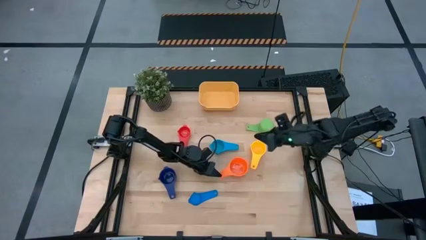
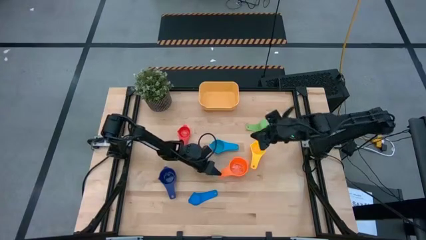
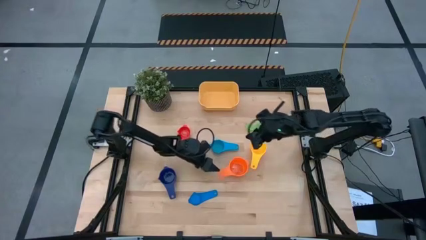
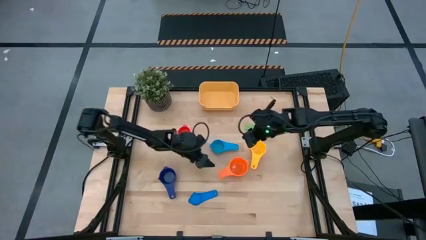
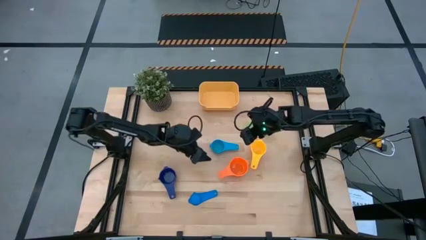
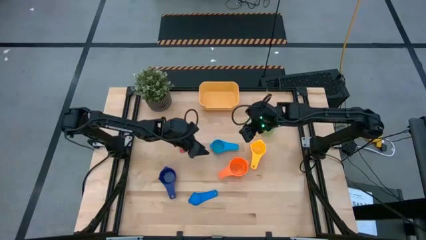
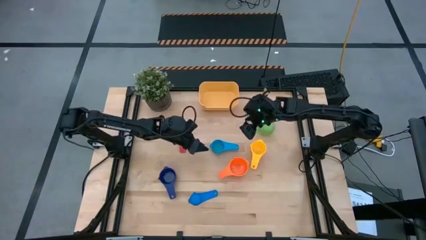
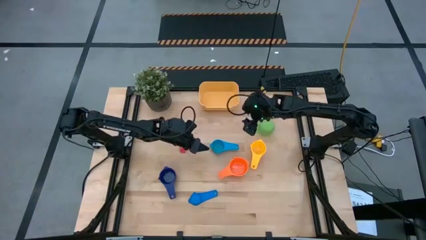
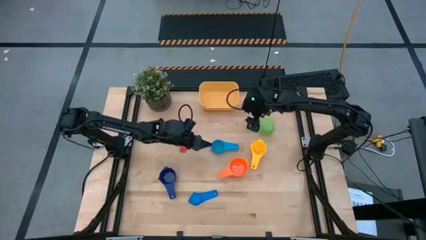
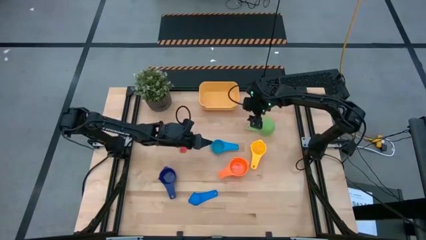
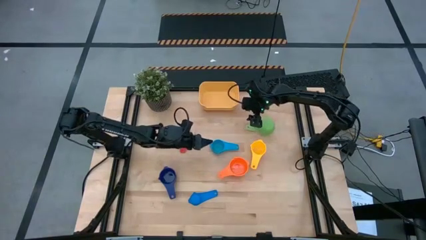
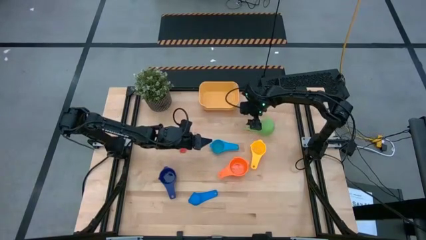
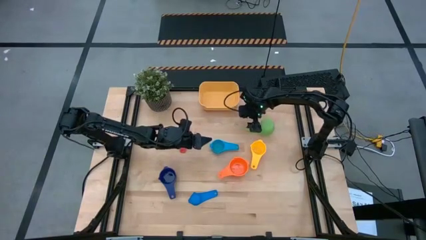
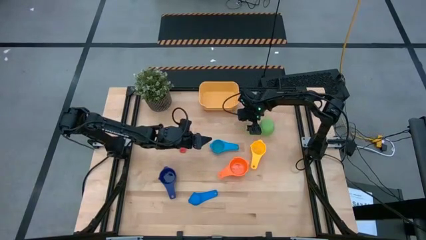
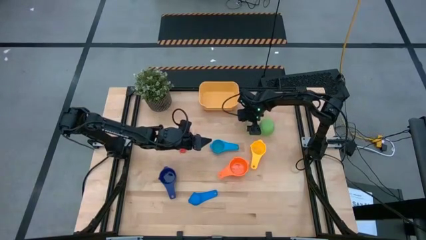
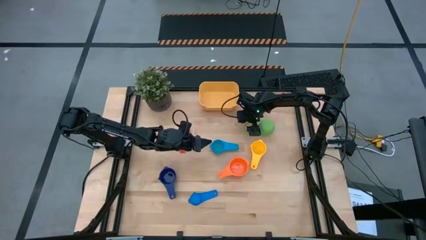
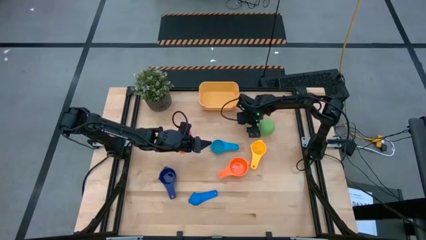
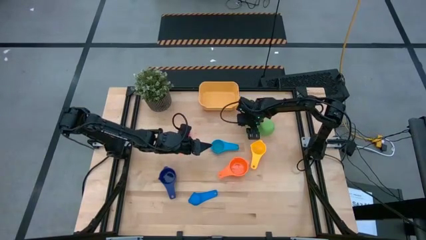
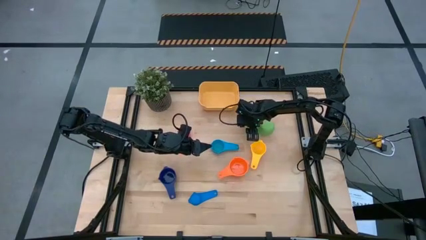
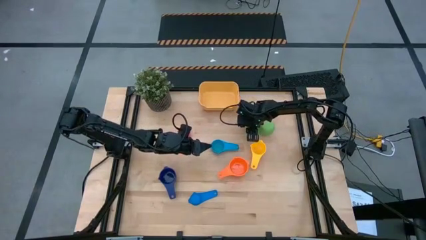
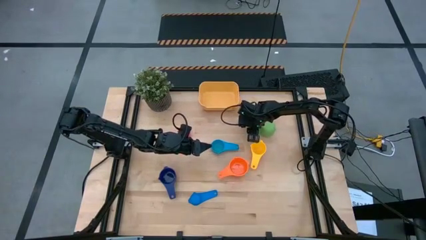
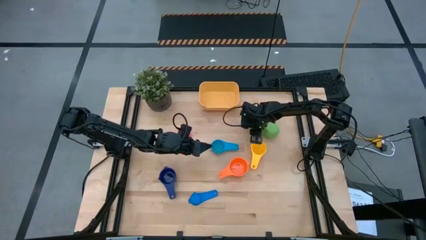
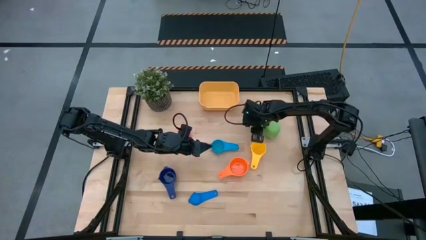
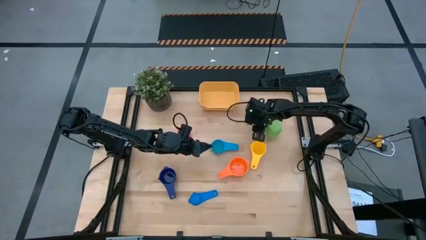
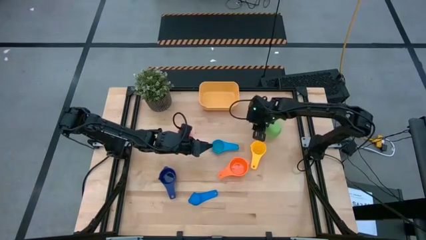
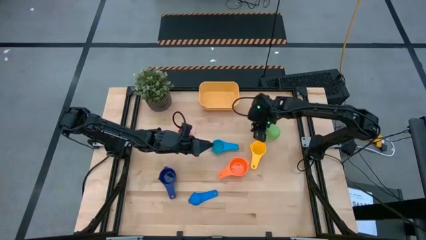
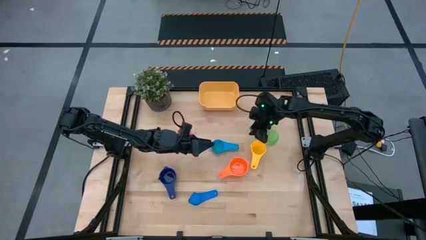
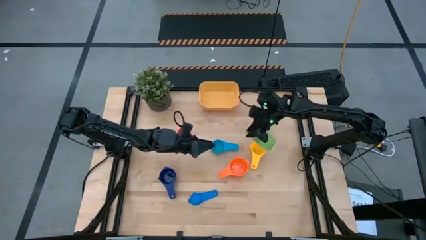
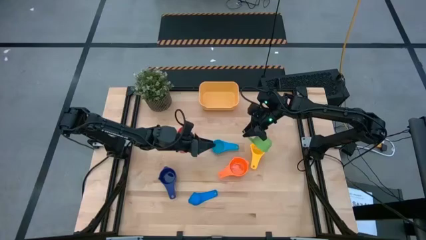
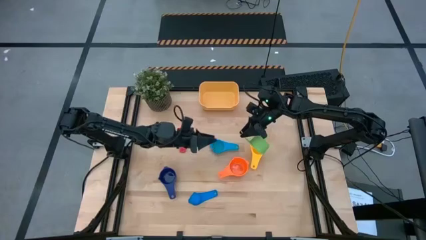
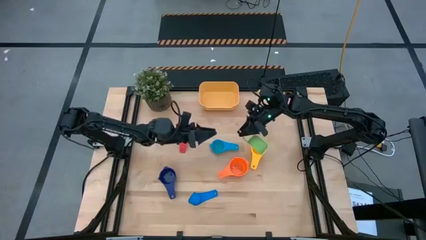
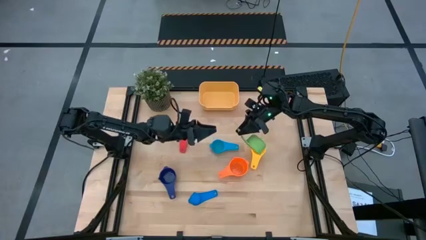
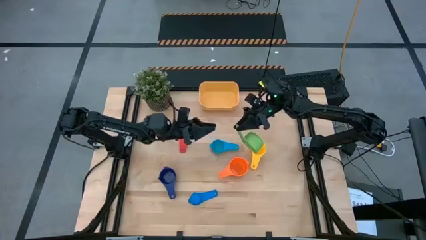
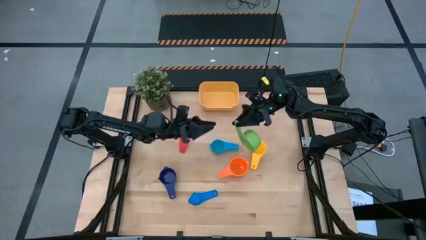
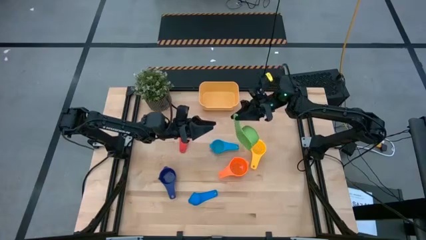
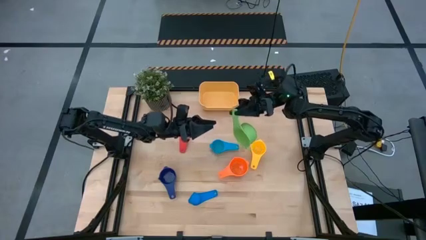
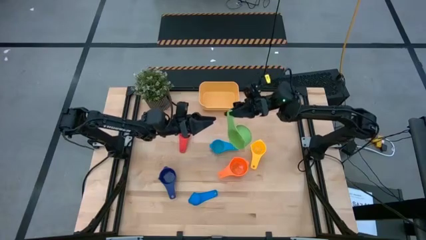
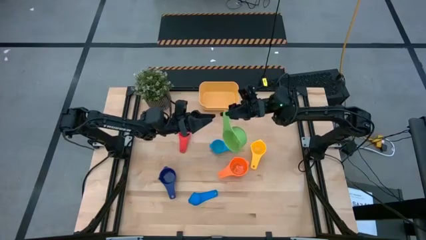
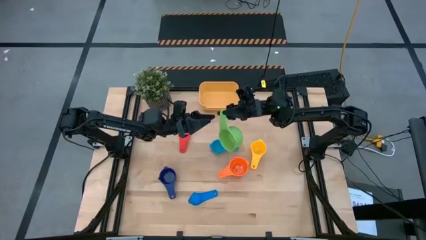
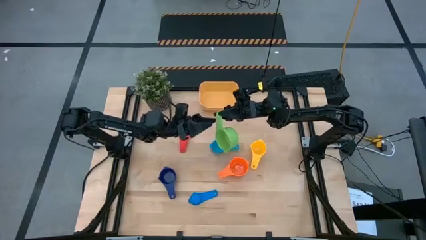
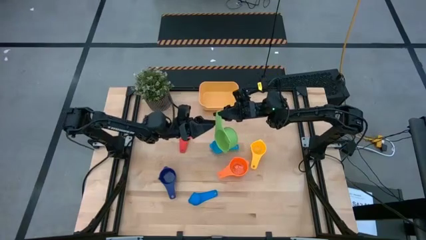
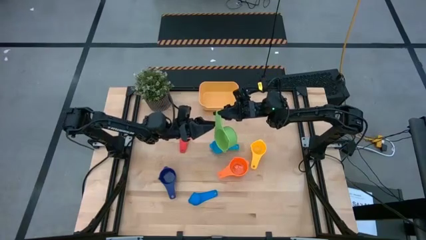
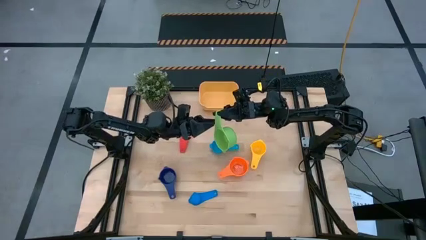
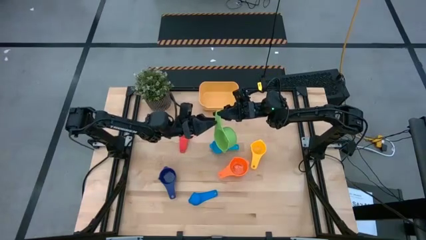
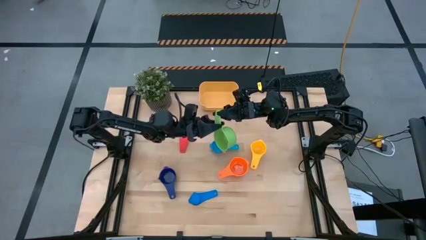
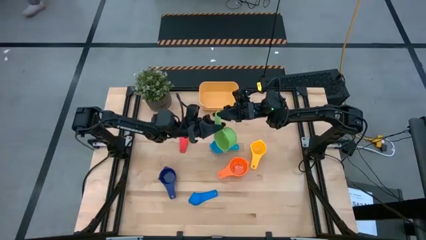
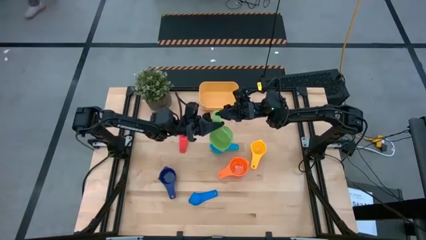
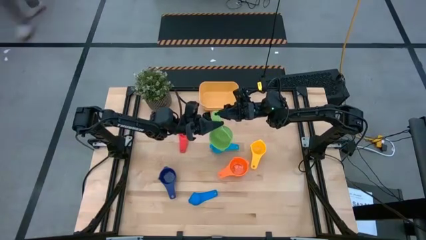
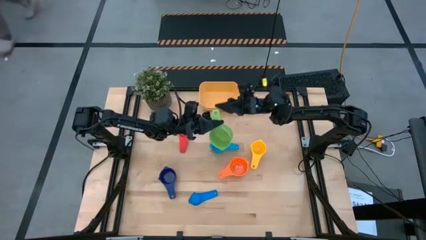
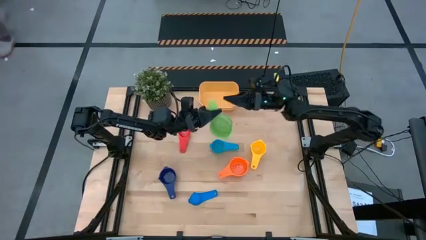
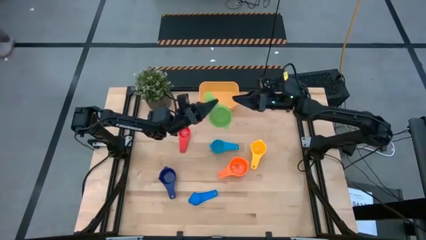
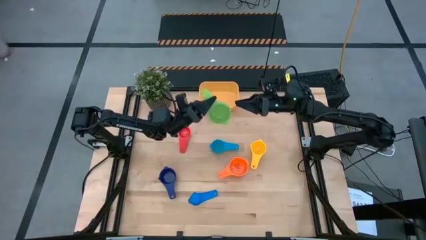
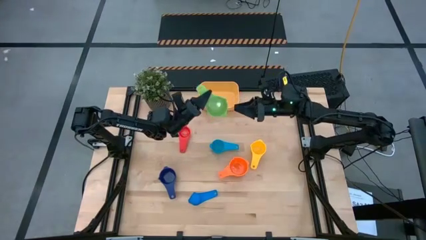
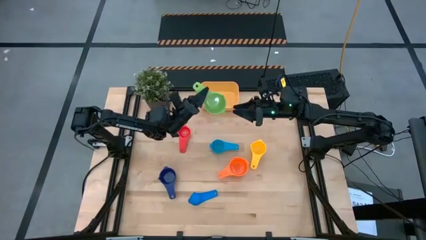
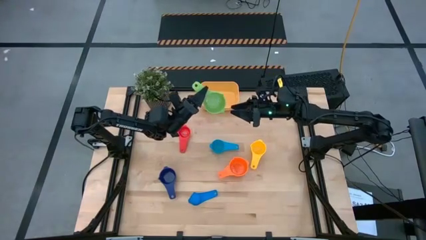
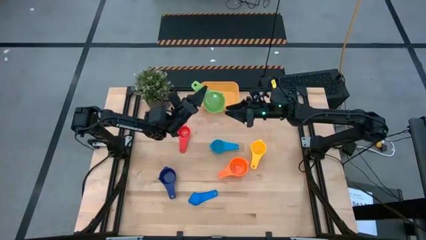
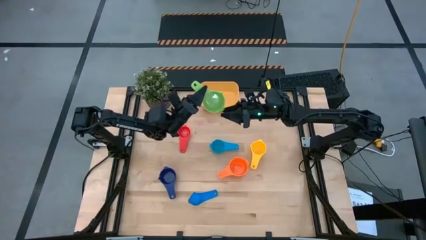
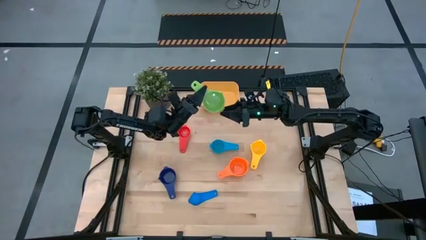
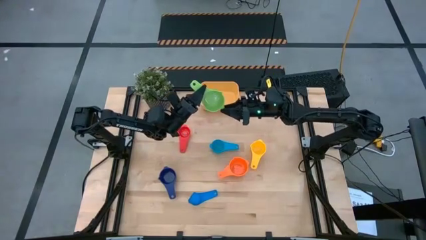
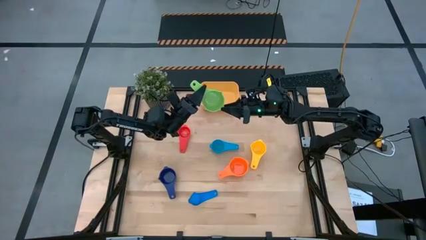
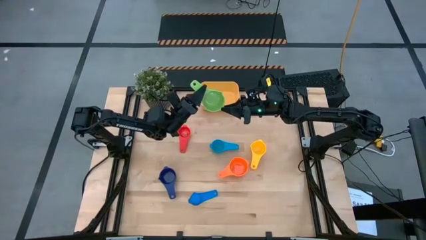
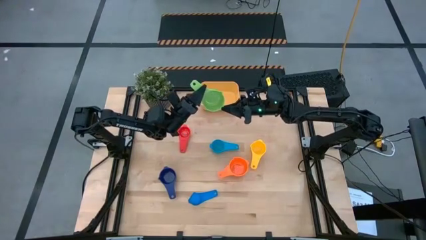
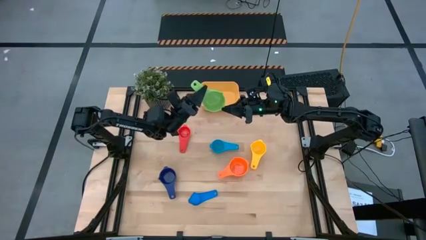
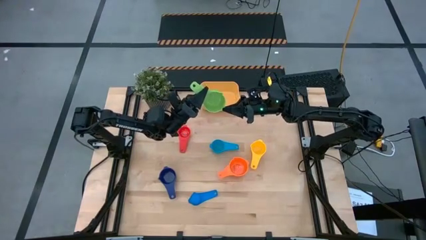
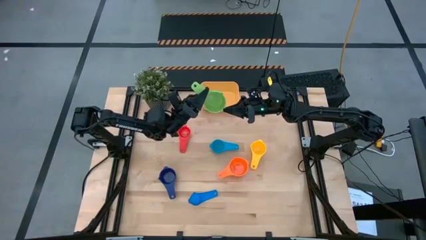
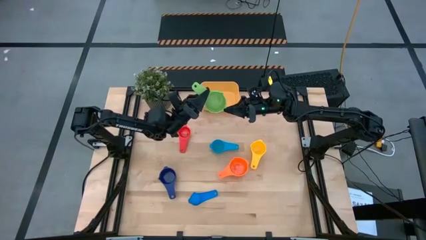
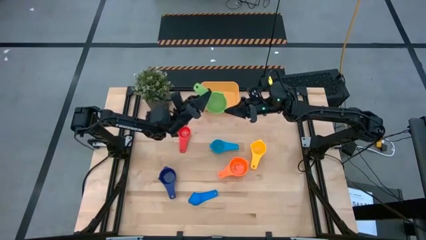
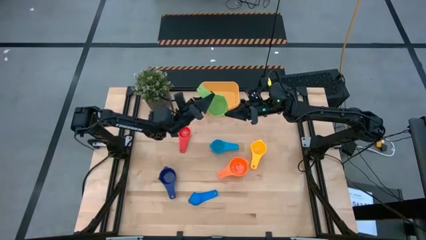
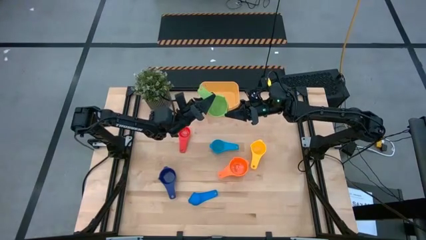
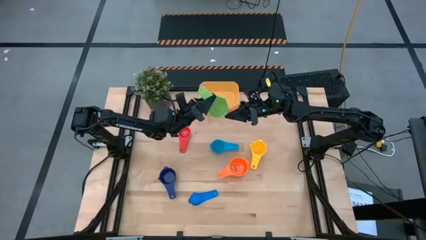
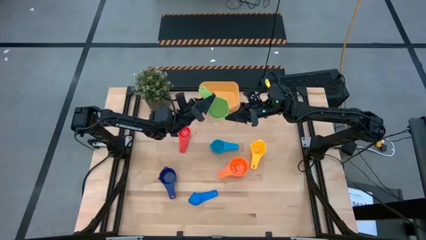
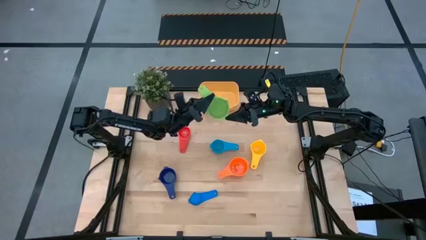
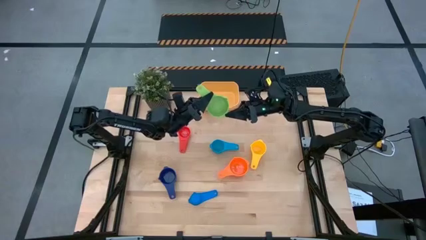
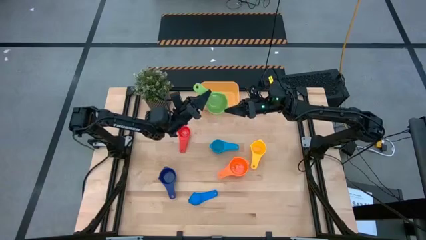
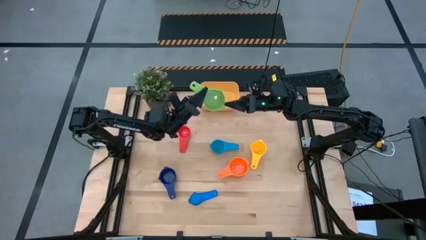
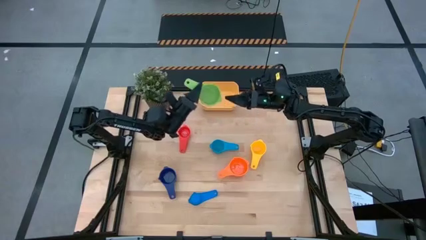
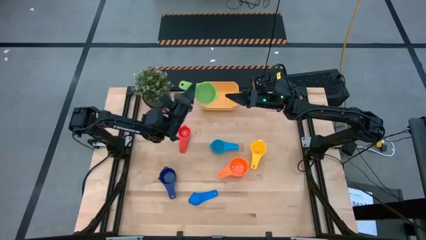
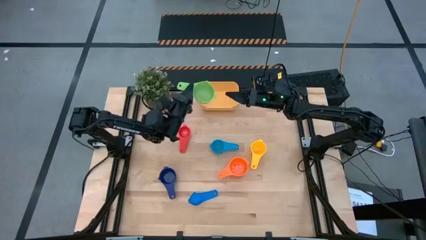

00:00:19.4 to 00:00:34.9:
Task: Nest measuring cups in basket
Stack the green measuring cup on top of the orange measuring cup

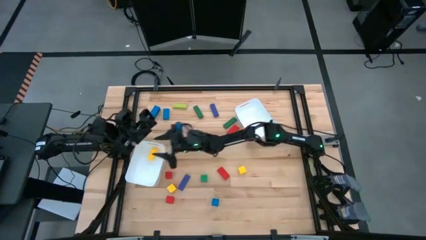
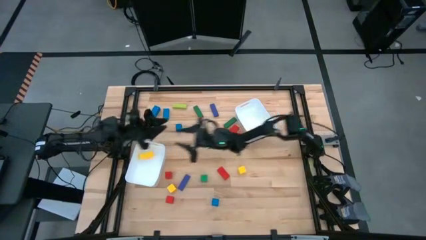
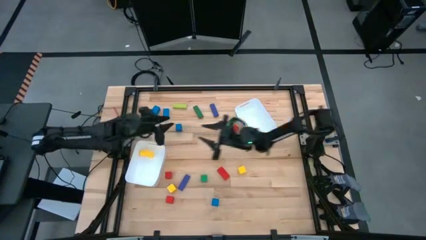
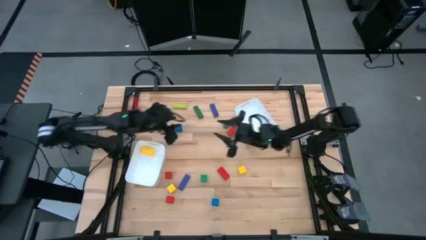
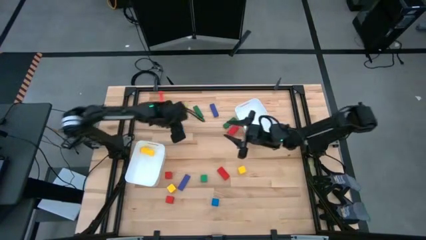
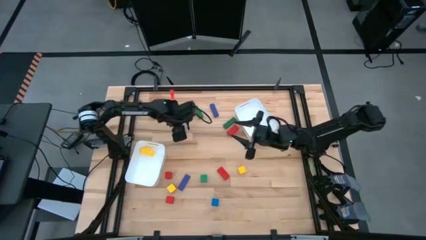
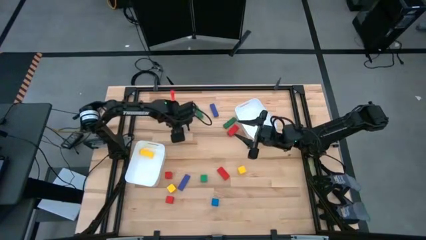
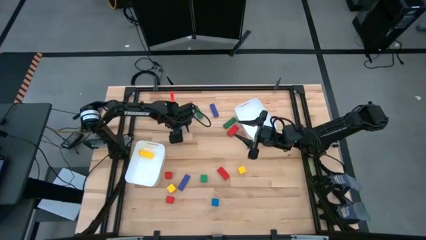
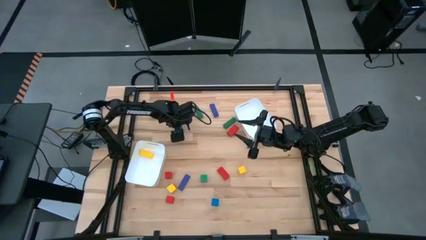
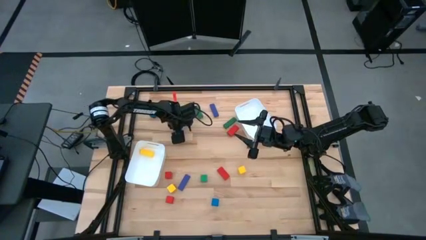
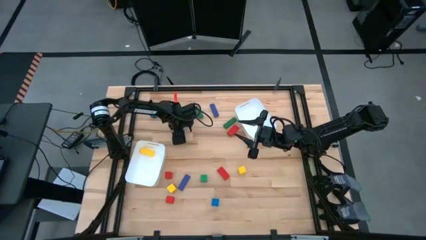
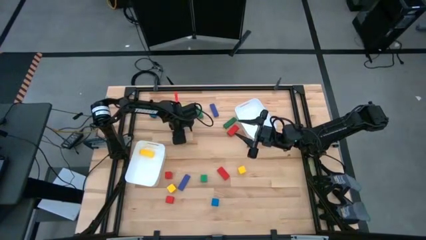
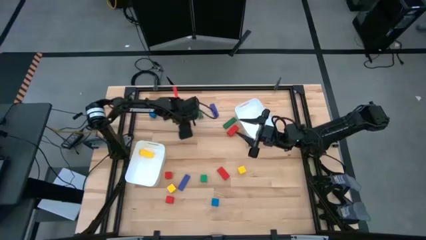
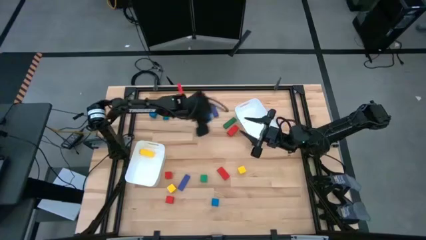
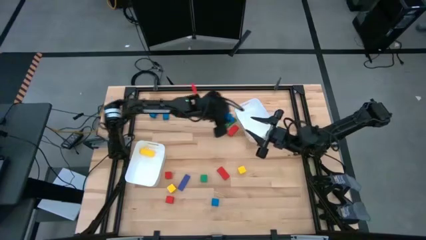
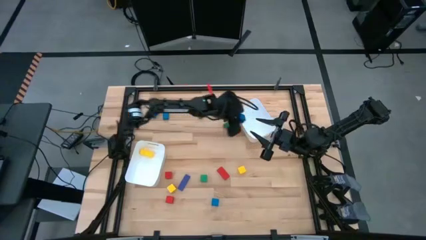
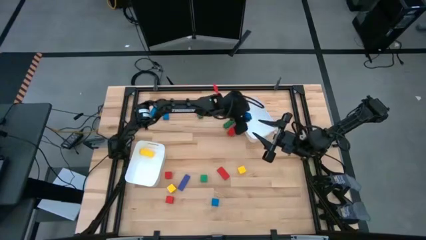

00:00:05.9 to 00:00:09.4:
Task: Sort blocks by size
Put the small blue block into the right white bin
